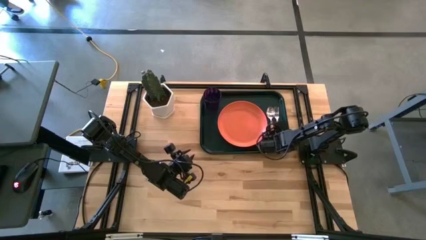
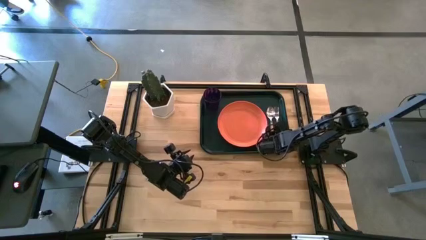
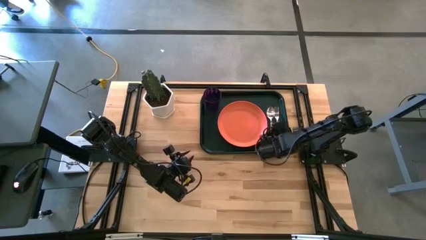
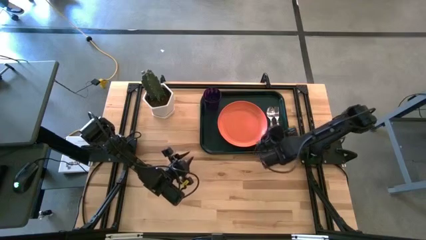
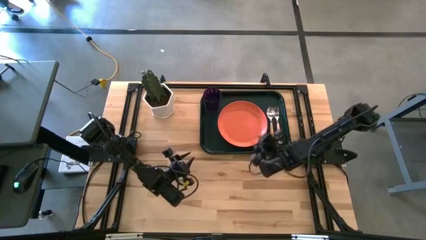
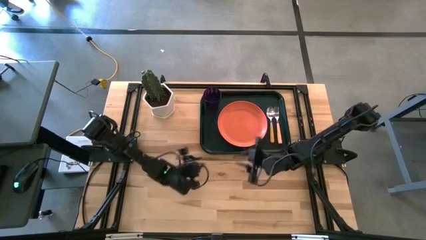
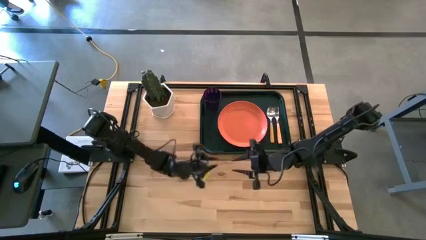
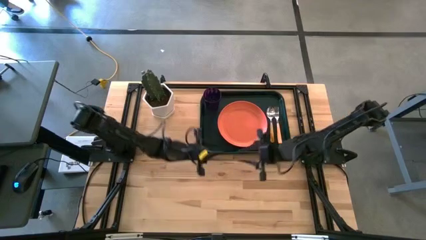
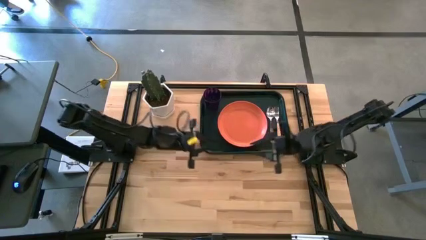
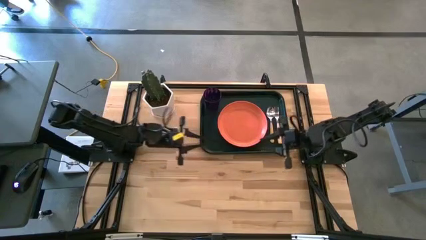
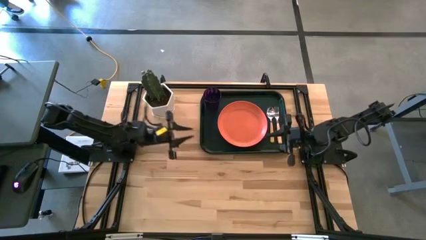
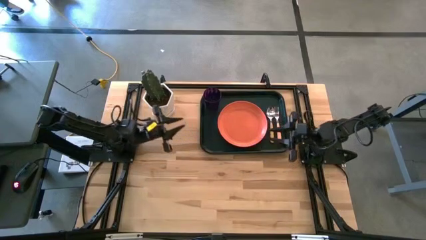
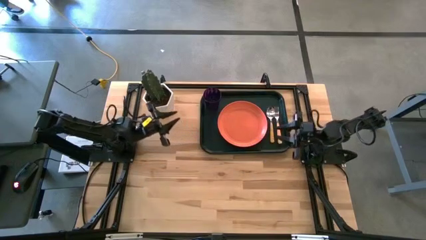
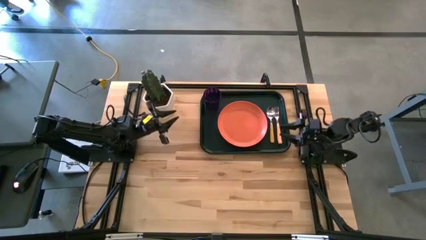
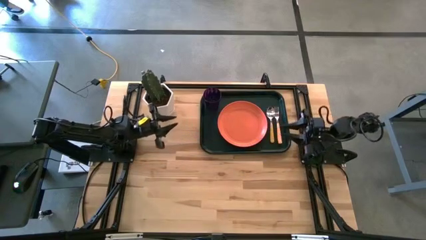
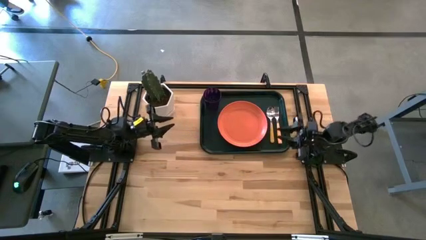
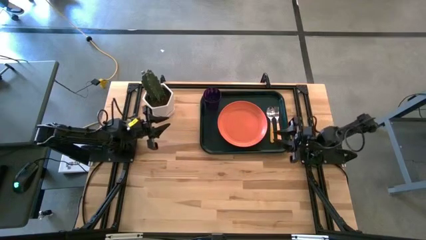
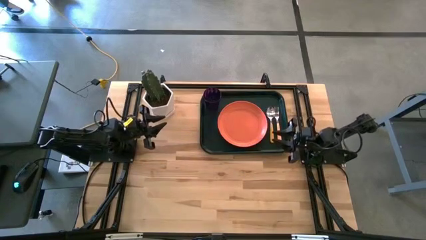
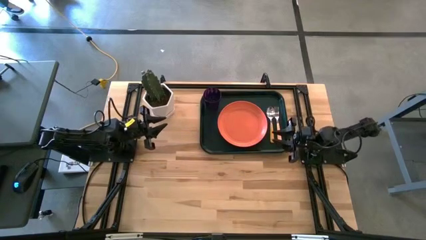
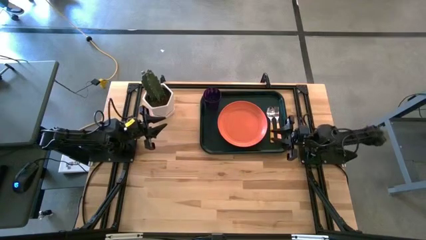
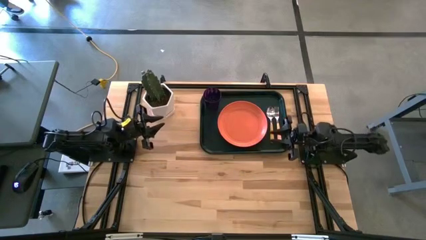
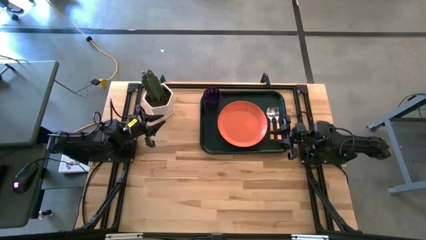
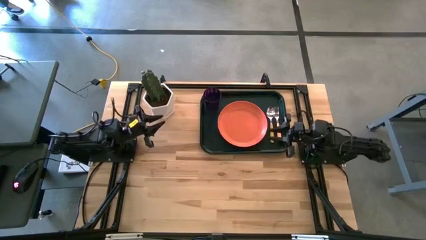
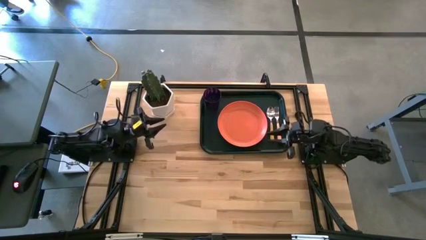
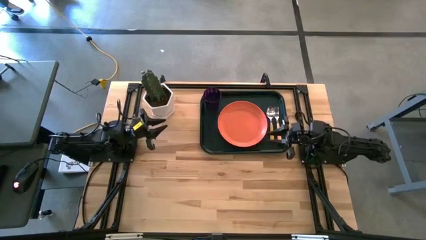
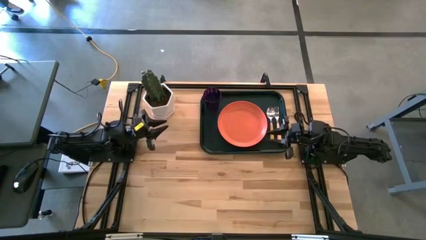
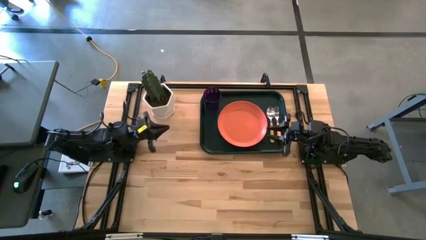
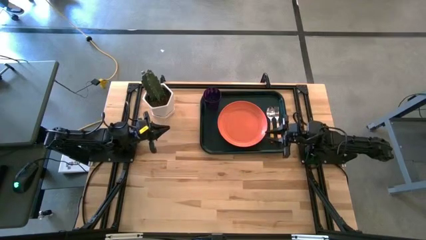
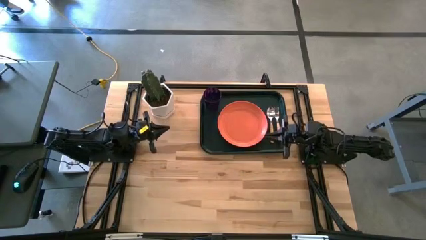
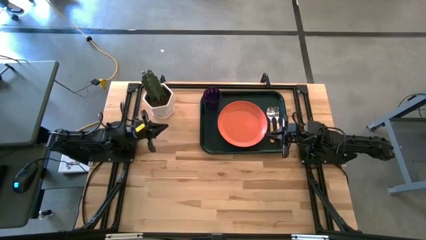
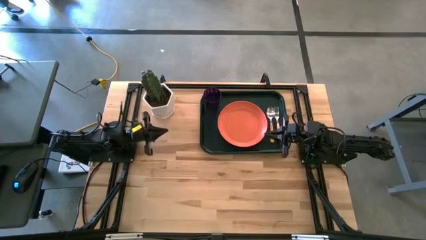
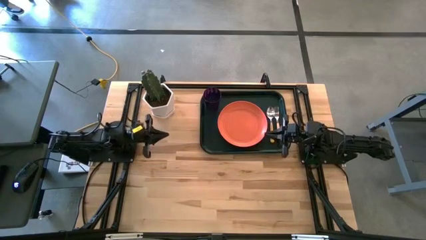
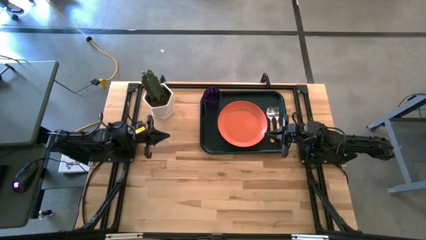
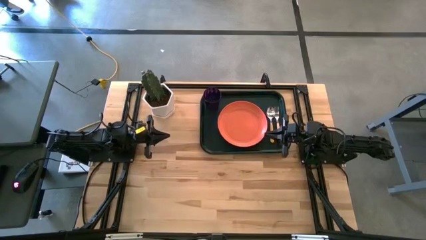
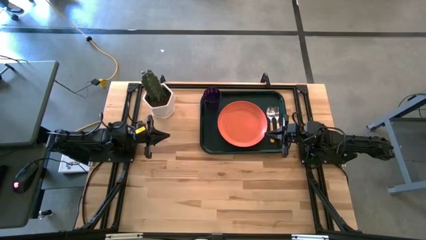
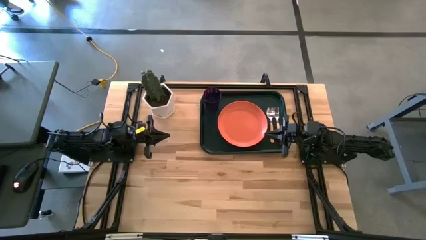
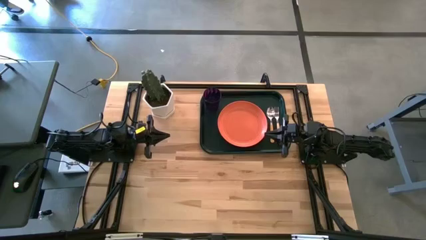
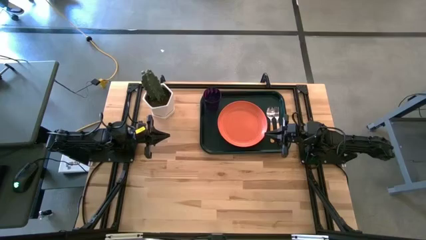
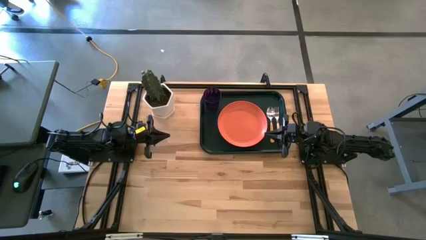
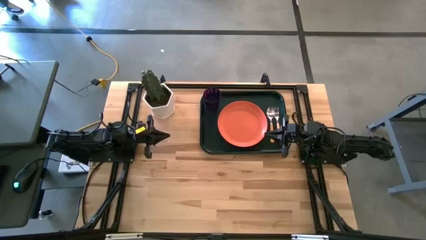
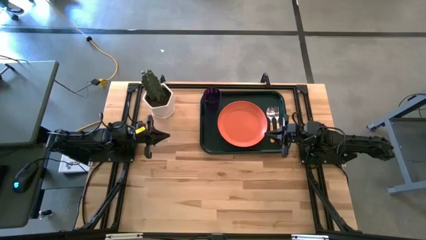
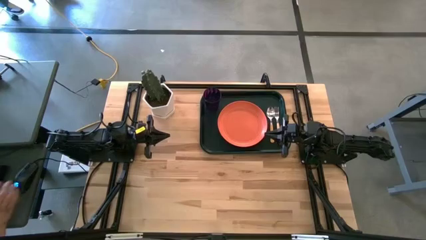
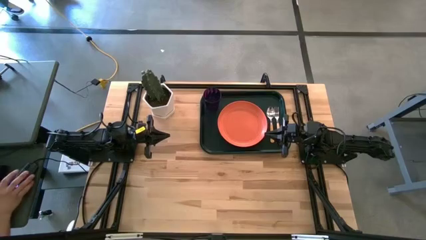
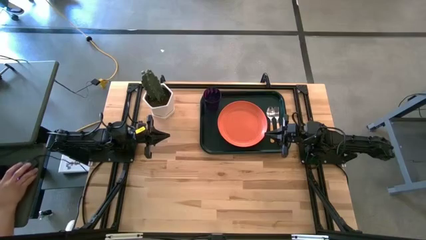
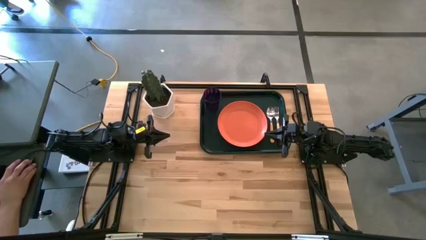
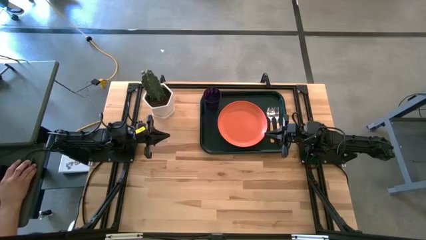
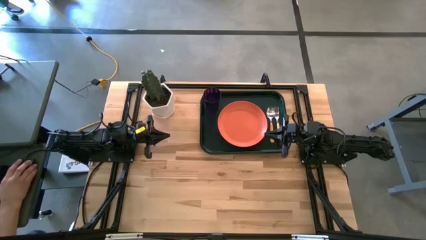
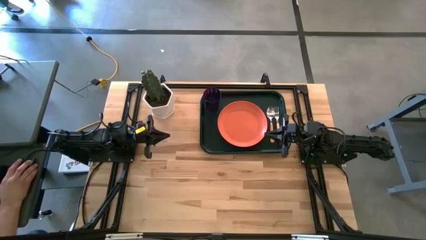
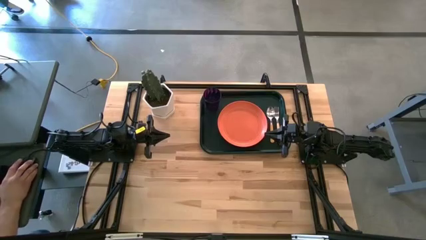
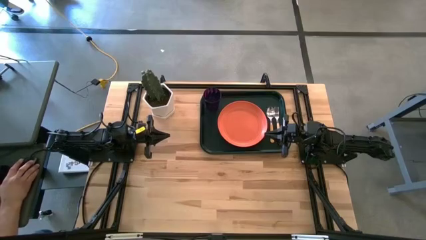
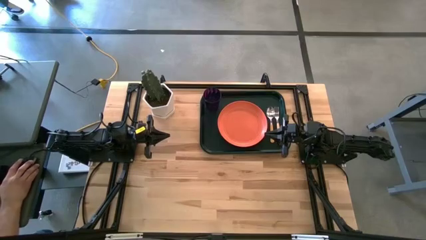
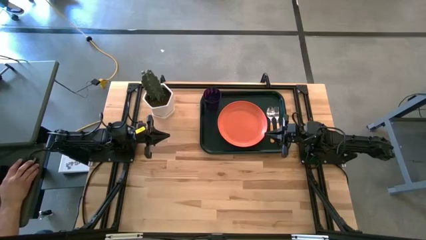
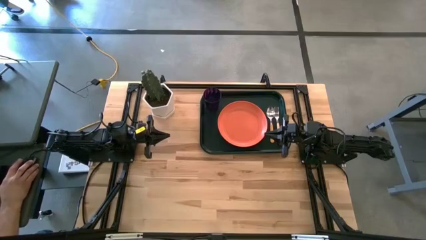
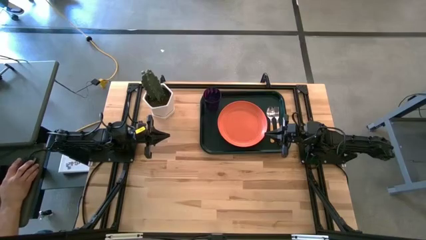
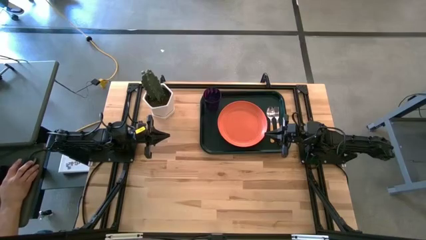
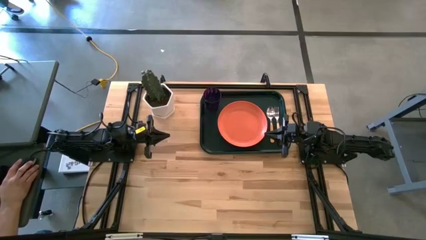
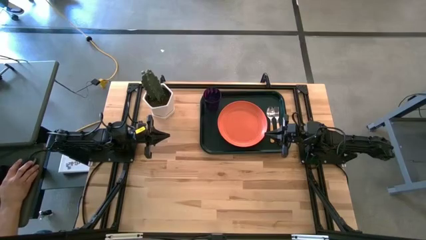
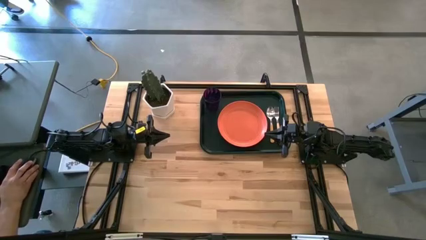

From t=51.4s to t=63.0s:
Task: Pick and place plate/cup/fork/spoon on tray
Return to Home Position

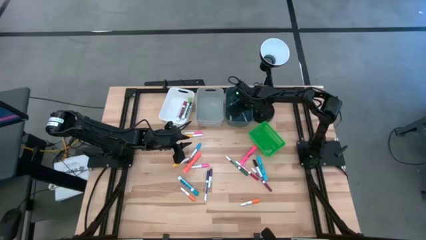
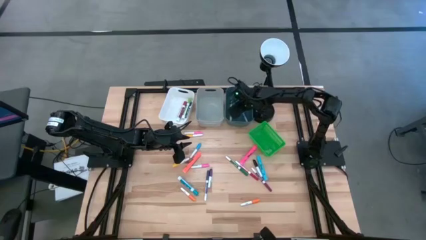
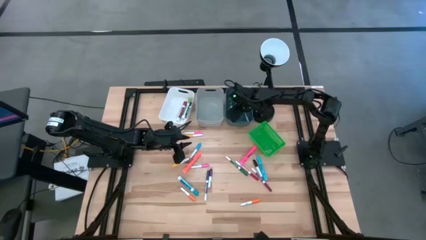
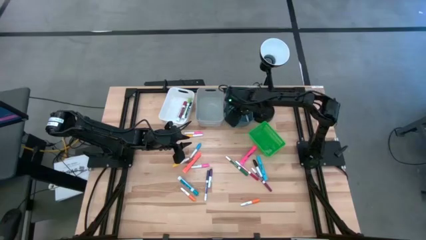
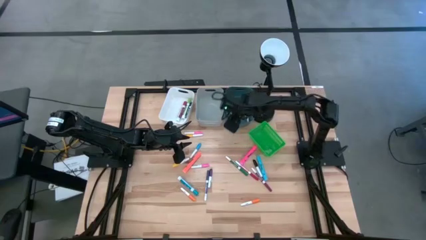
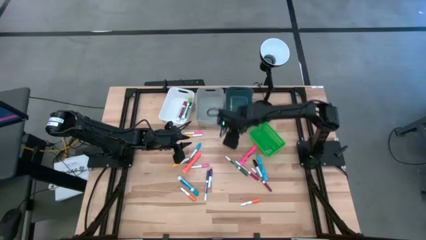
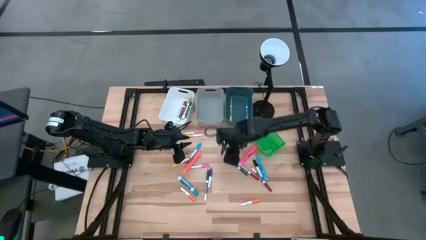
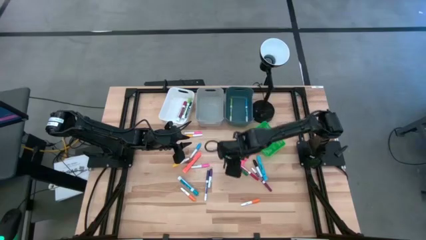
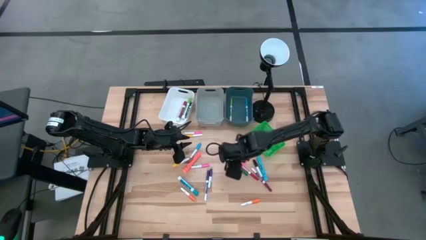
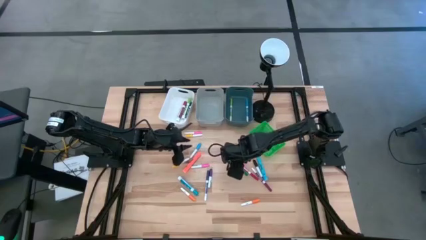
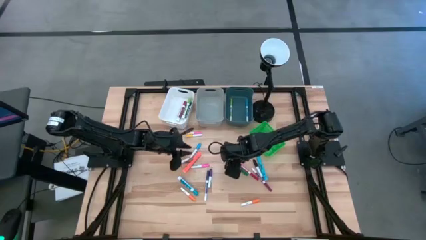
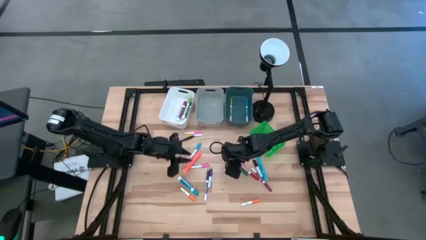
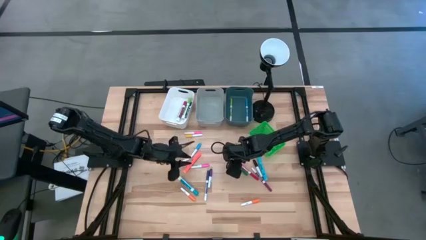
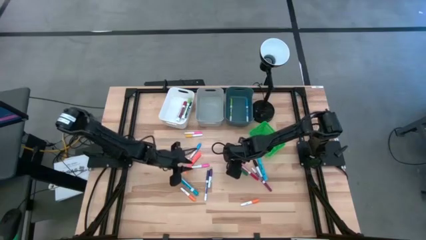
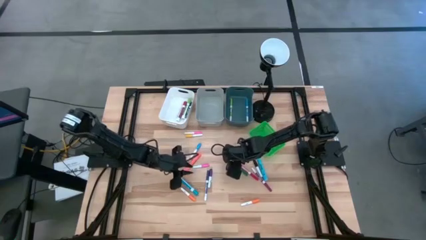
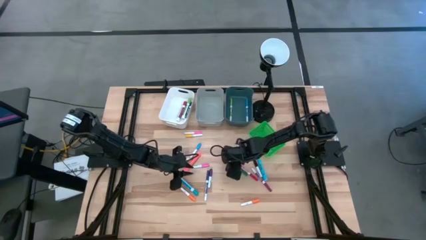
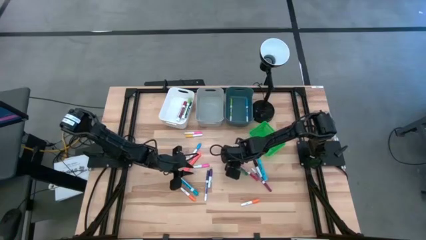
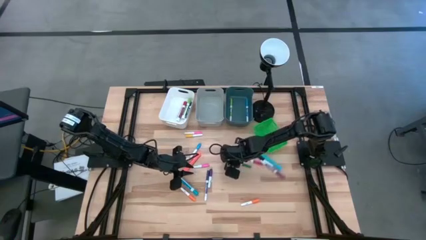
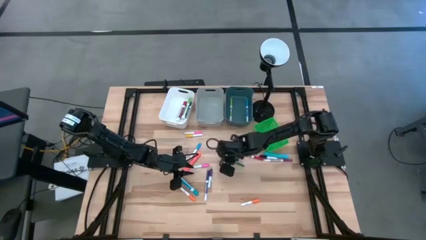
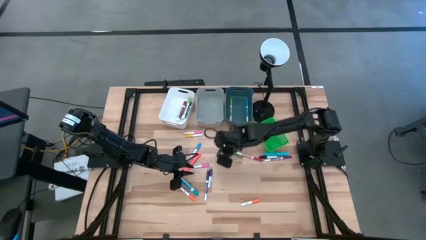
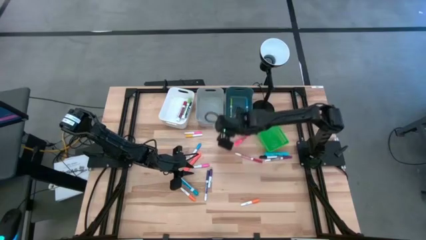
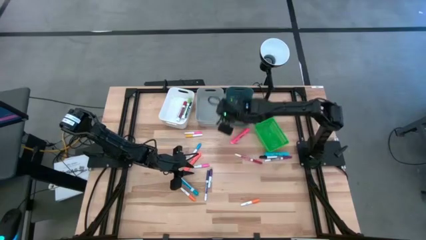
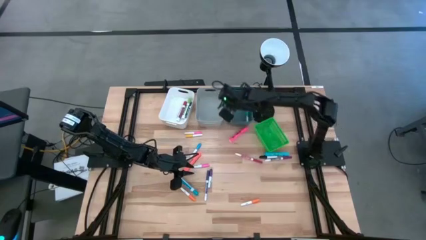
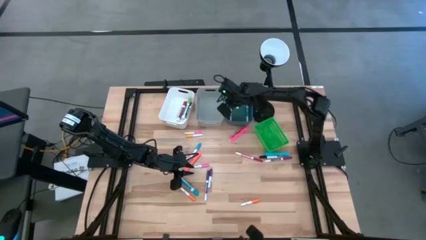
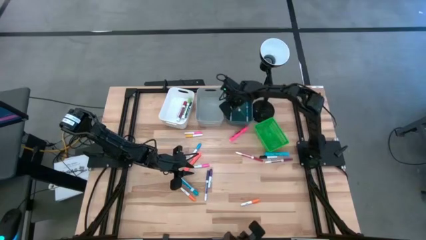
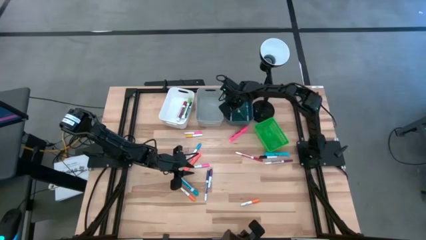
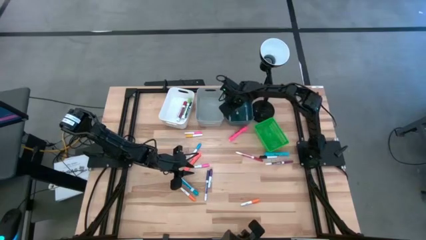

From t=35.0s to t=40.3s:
Task: Pick & Place Markers
Put the green marker pen into the blue bin
